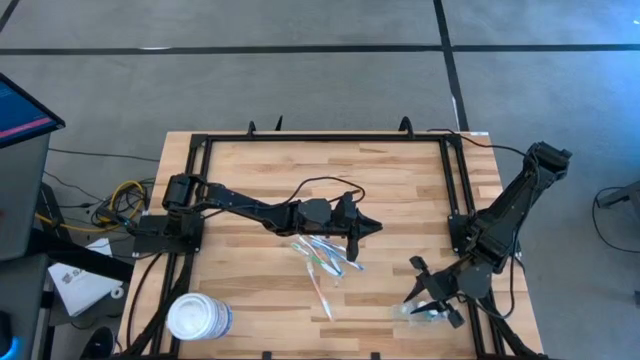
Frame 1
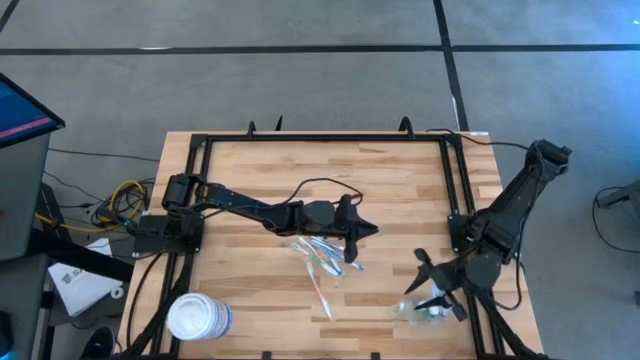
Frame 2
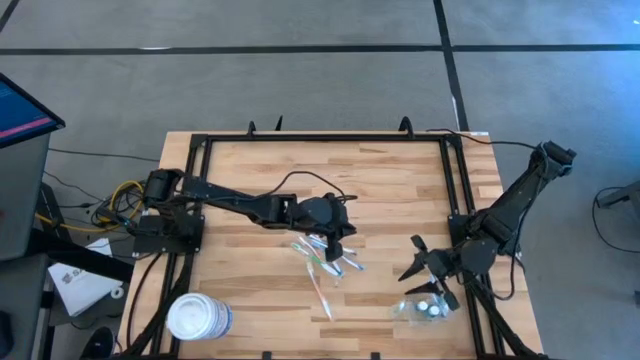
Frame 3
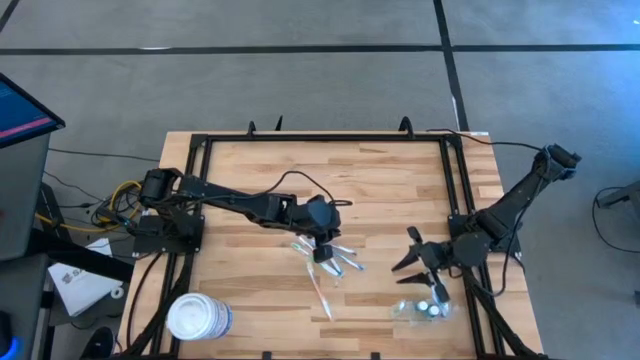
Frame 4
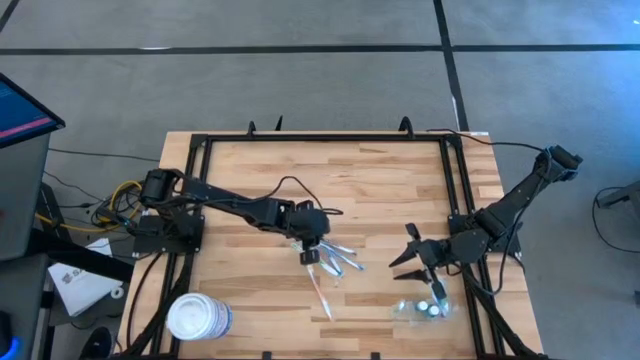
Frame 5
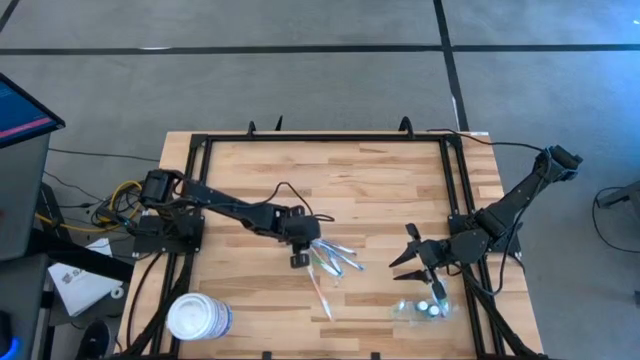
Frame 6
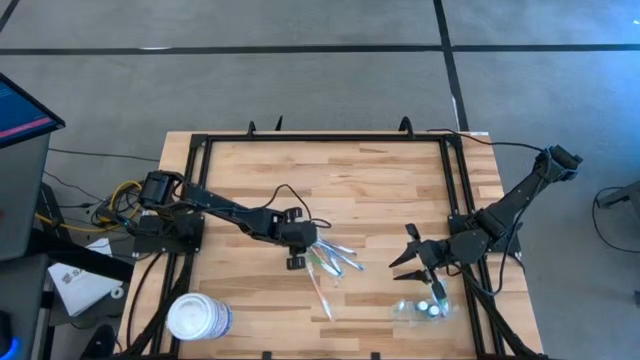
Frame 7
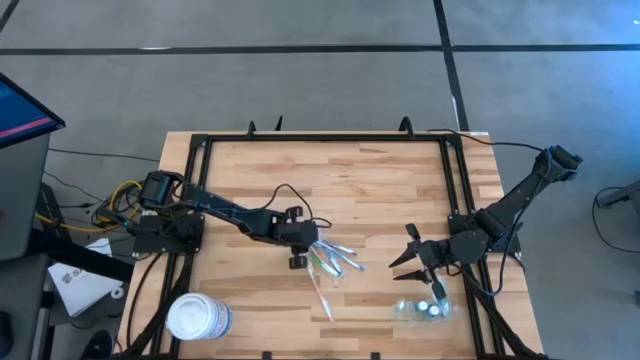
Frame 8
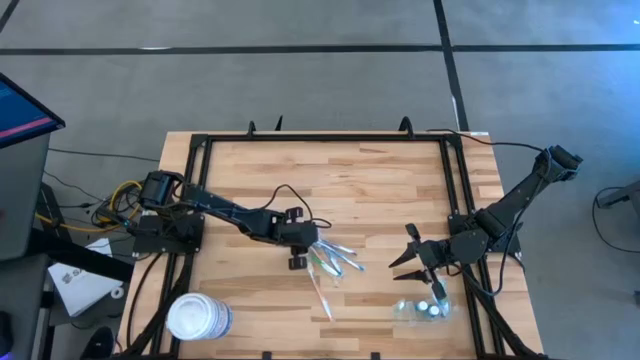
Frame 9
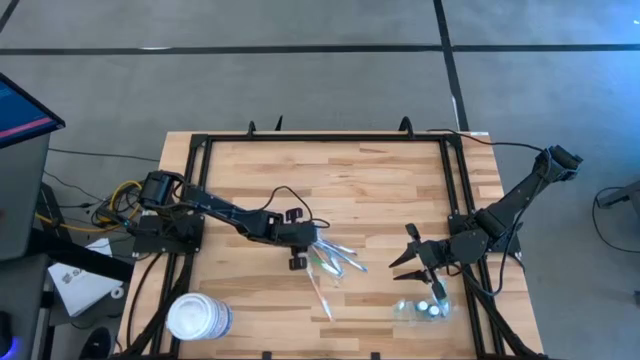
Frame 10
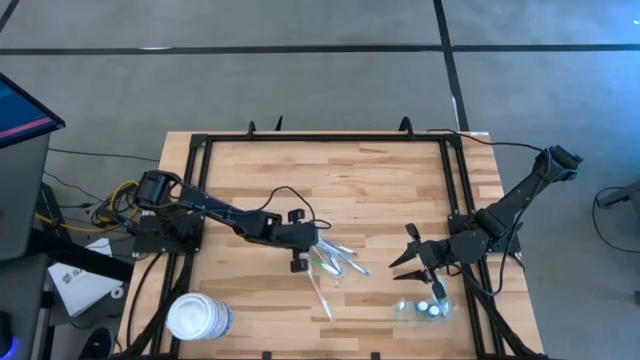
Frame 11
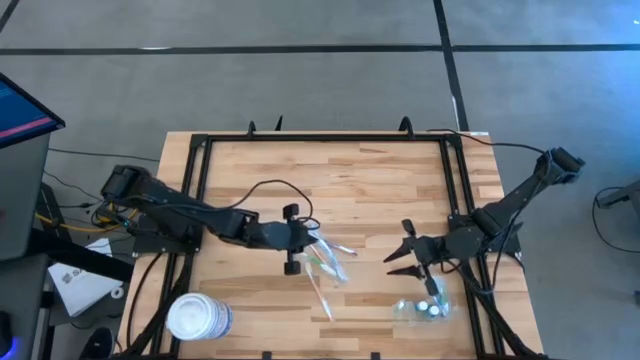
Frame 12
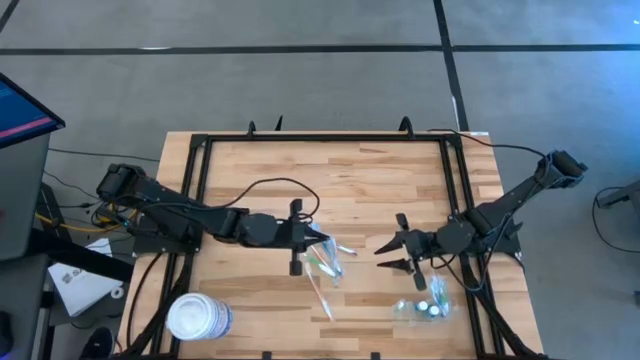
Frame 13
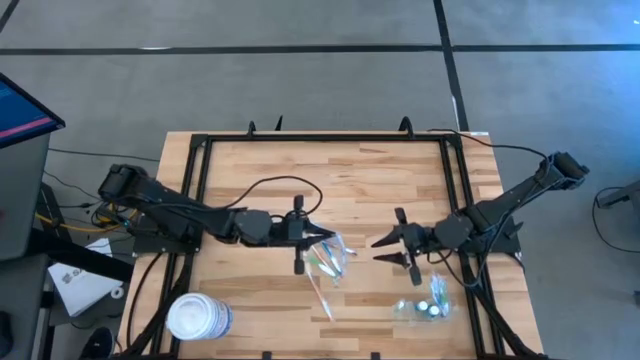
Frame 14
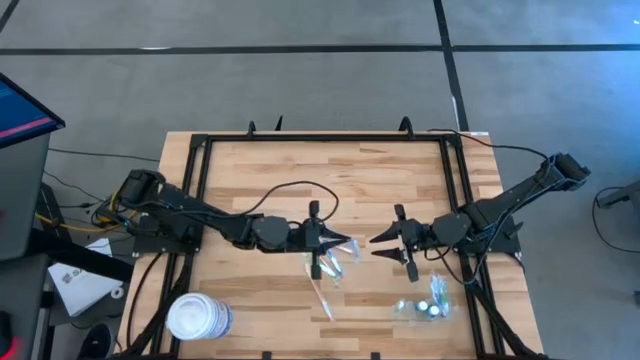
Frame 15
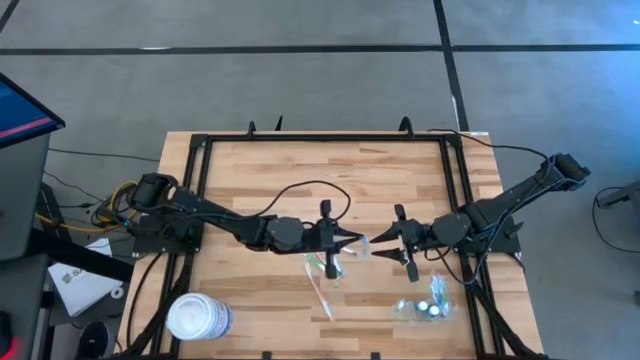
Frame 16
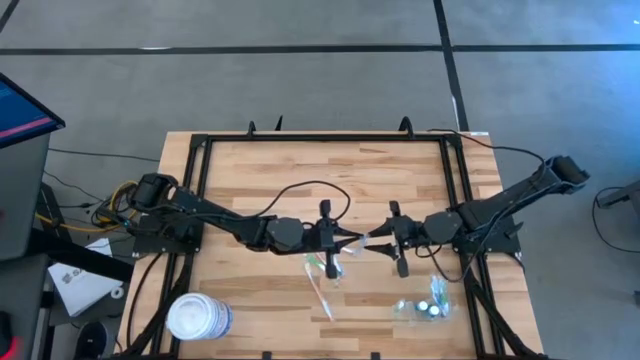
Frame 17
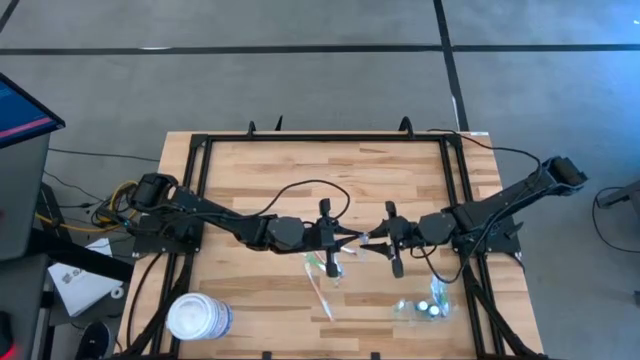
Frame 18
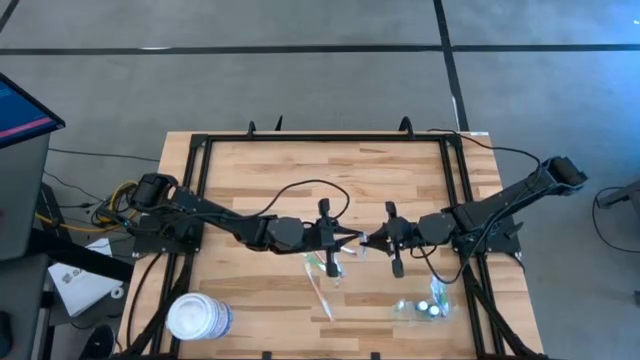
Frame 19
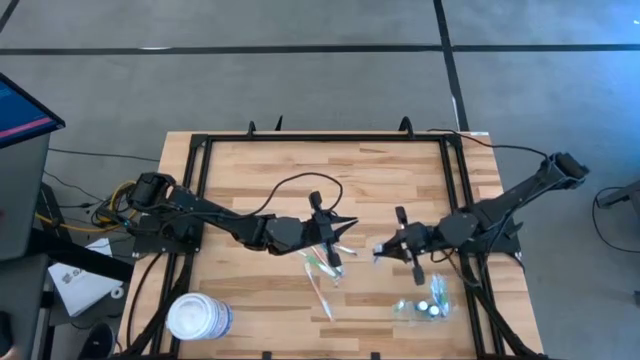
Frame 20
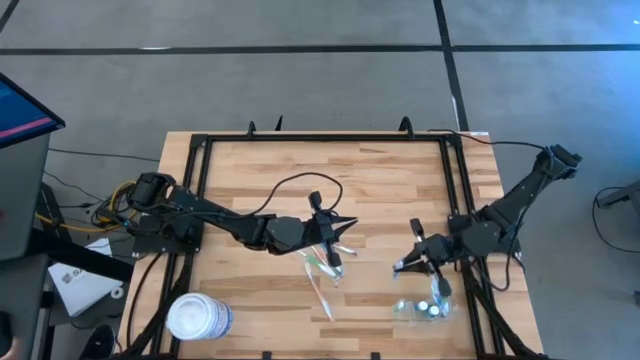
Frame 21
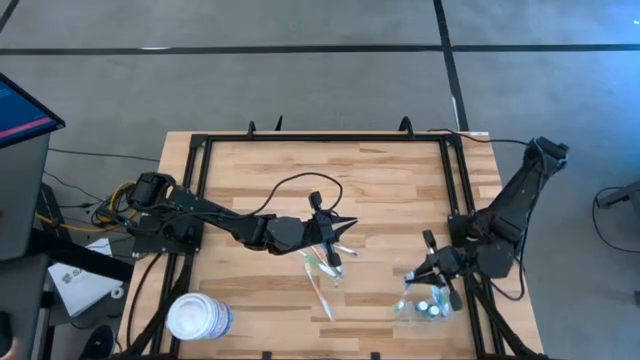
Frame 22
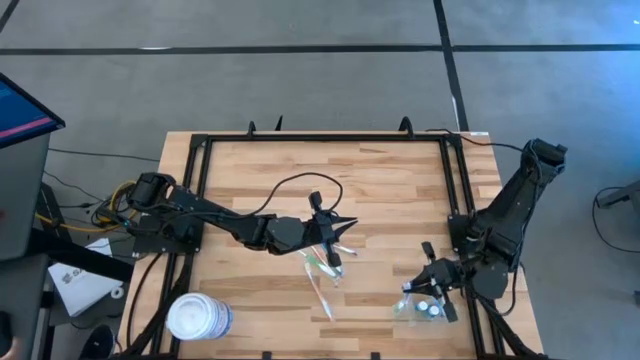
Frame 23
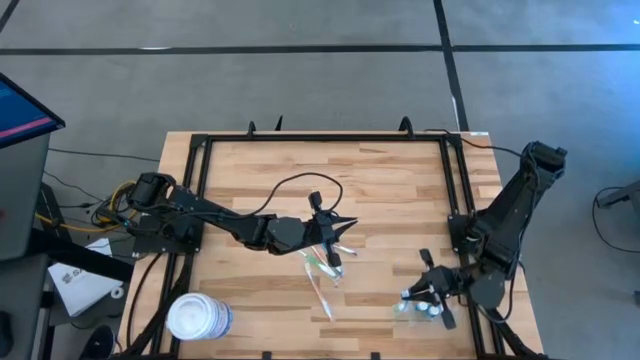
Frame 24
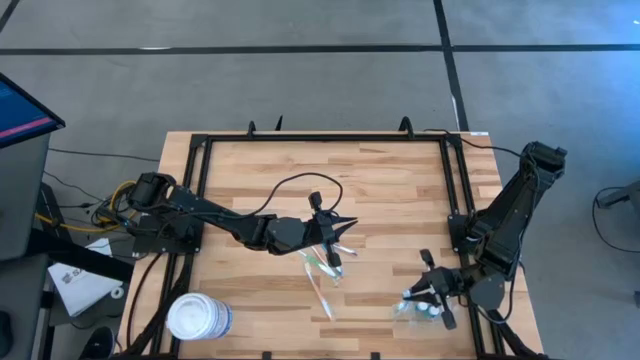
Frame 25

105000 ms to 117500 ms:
Task: Pick & Place toothbrushing station
Put the blue toothbrush into the transparent organizer

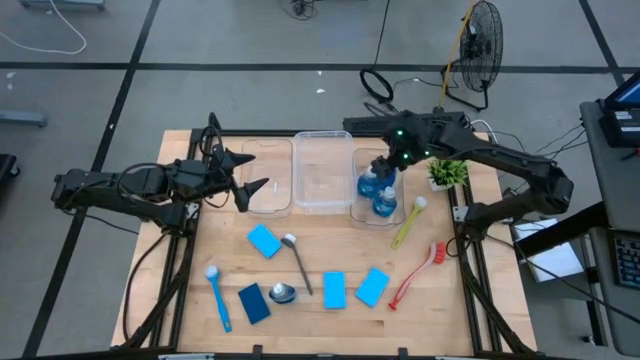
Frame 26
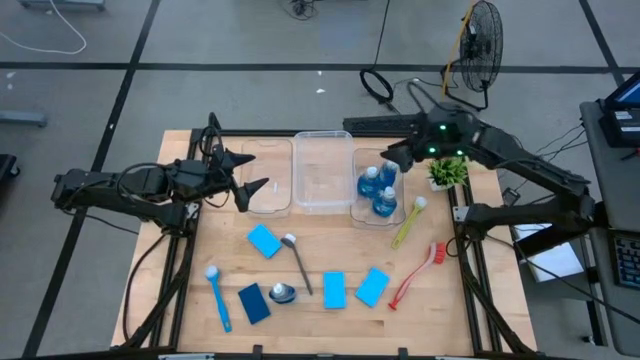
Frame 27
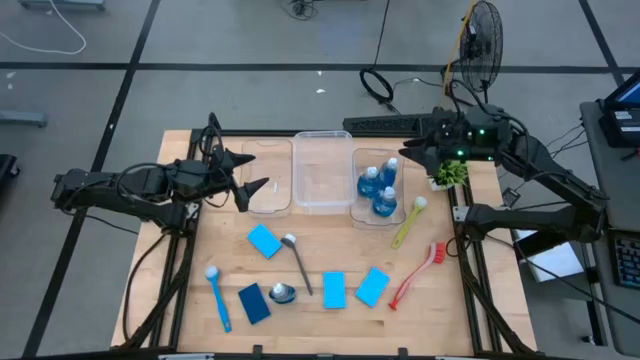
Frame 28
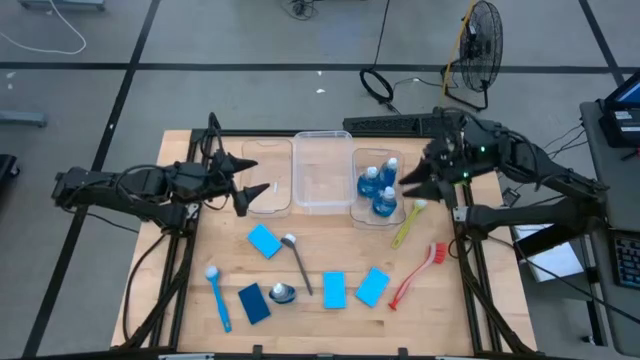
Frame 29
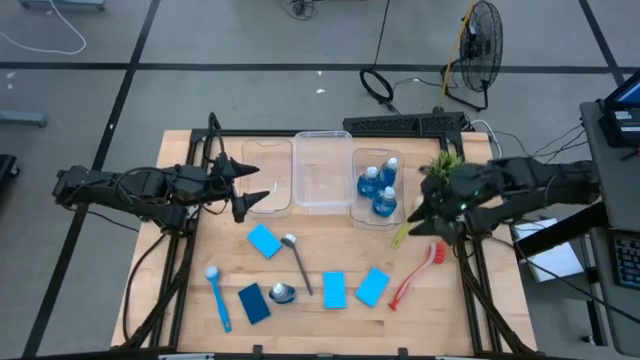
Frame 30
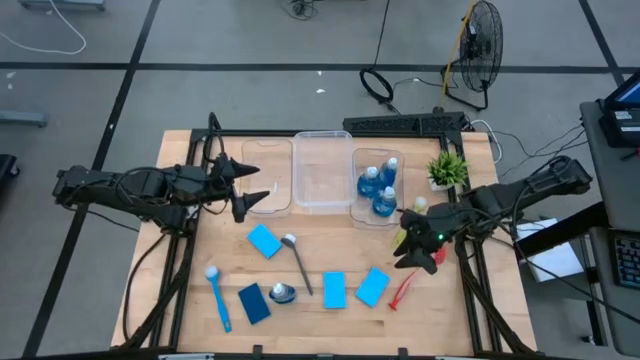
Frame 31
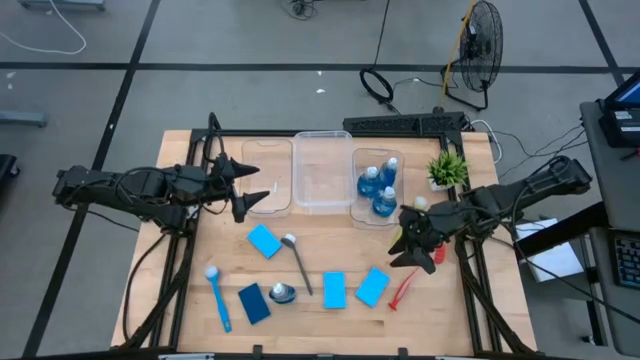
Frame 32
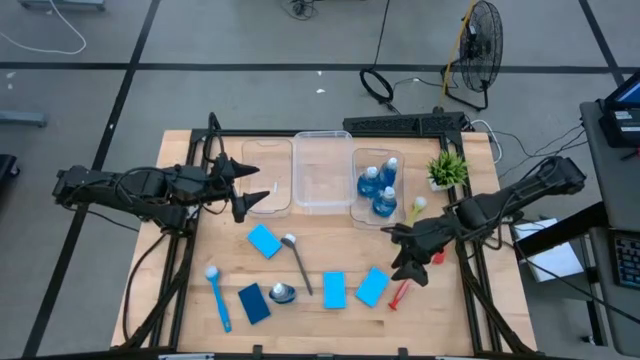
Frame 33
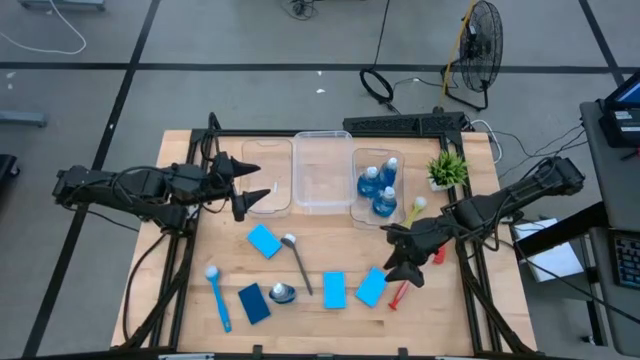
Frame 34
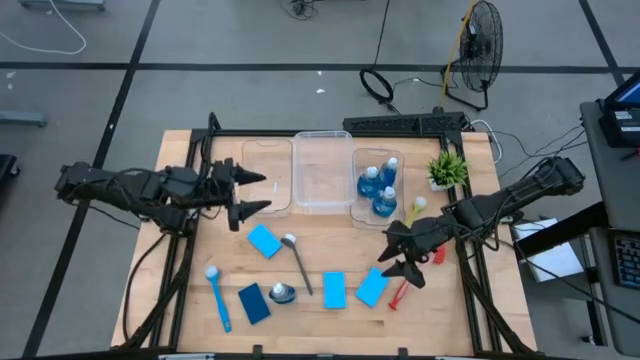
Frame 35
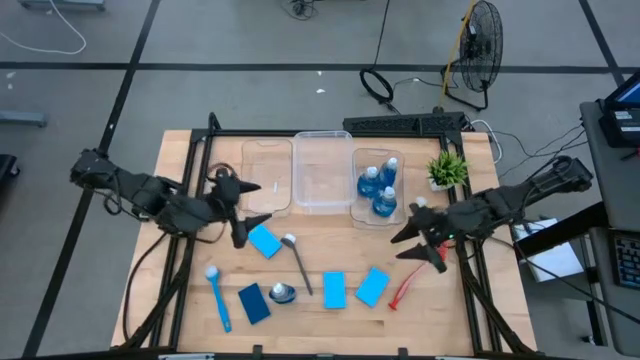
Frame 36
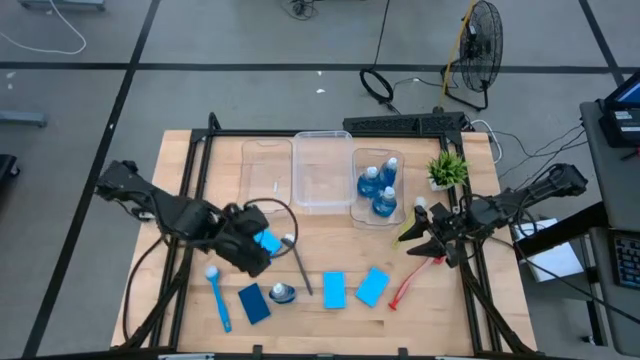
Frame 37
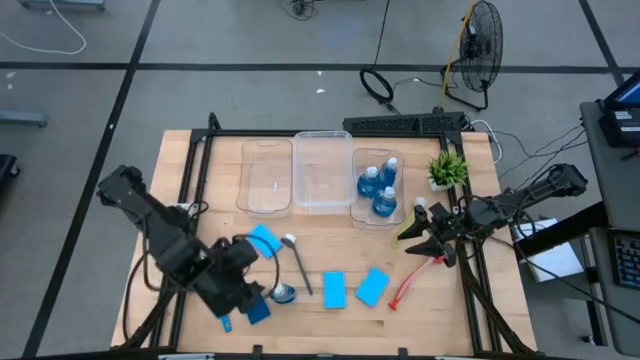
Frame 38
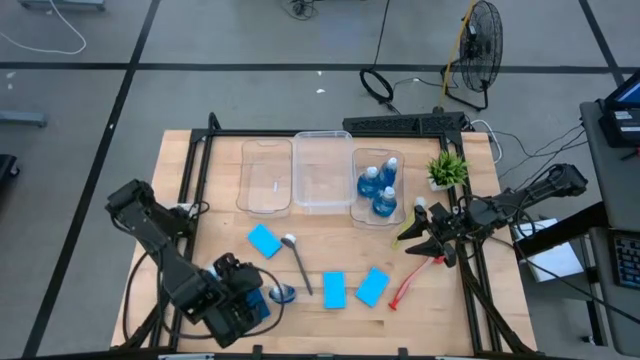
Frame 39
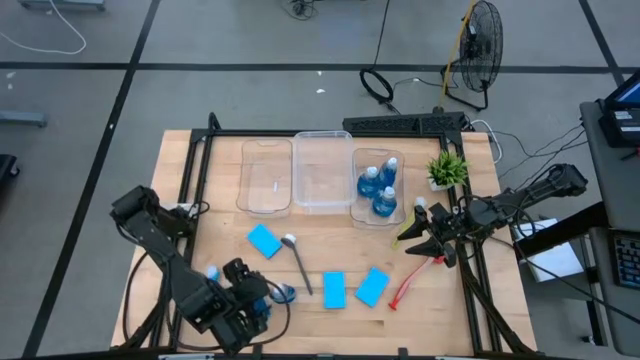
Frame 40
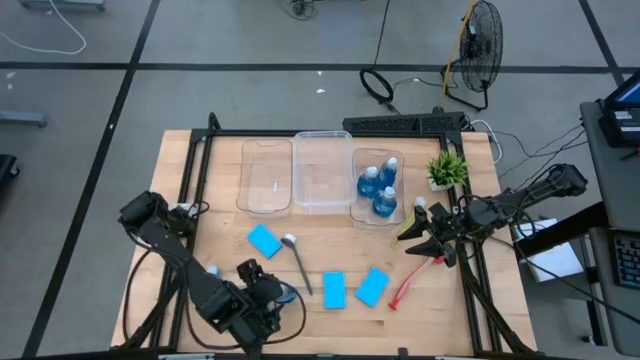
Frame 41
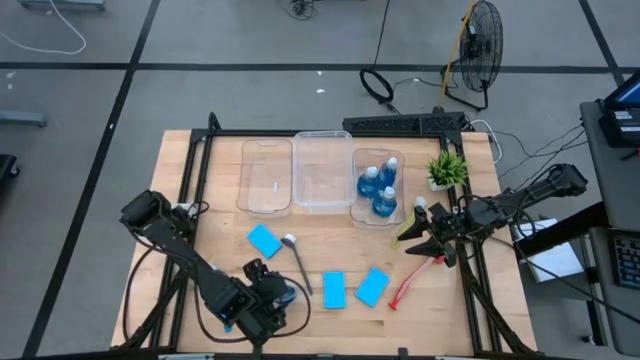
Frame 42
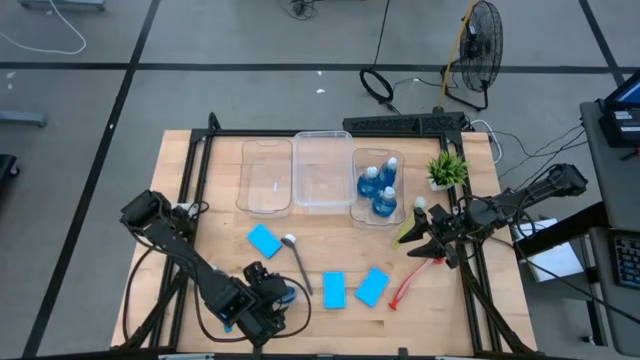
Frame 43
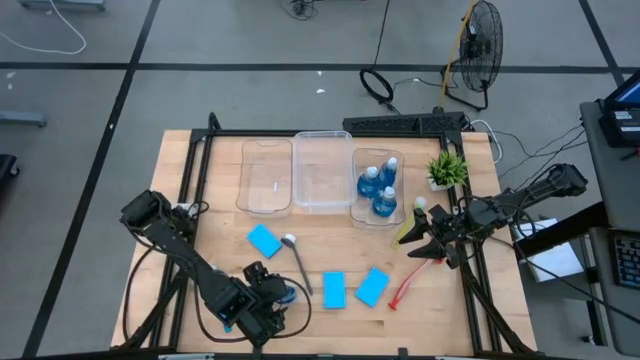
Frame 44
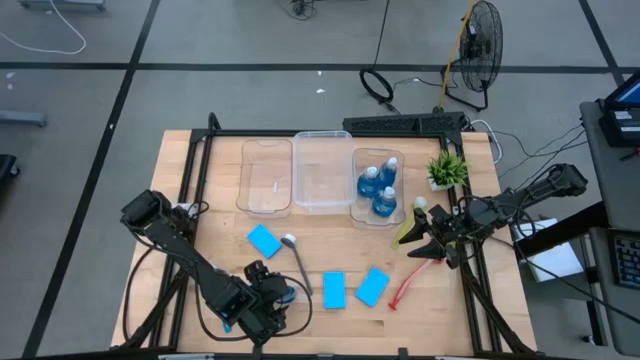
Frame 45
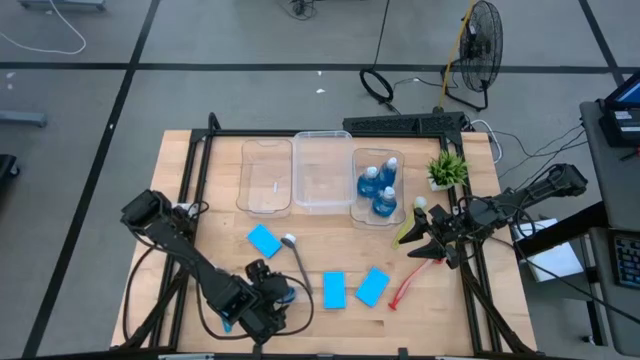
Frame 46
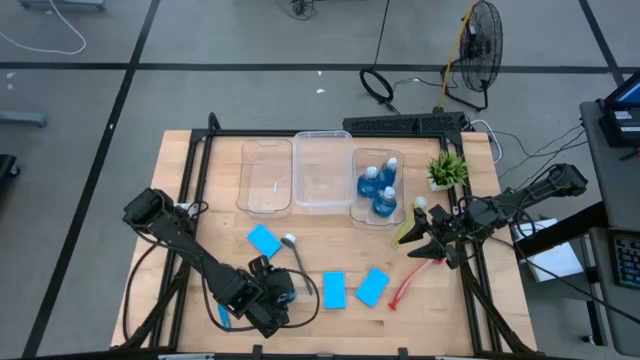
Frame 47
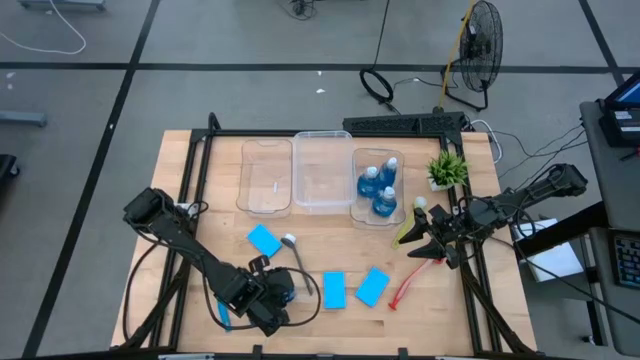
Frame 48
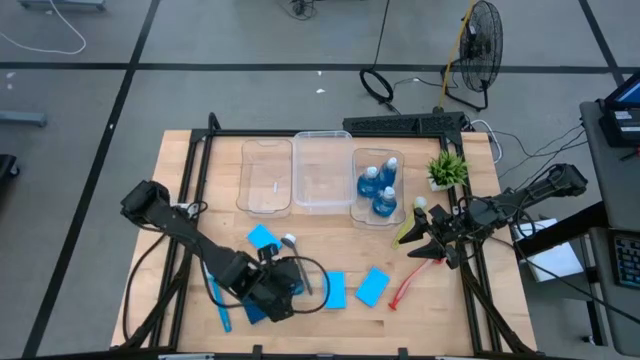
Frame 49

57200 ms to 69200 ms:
Task: Pick & Place Kitchen Sink Supplies
Put the blue dishwashing liquid bottle into the right transparent bin
